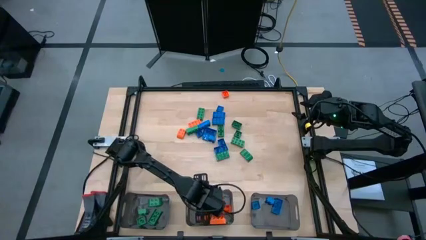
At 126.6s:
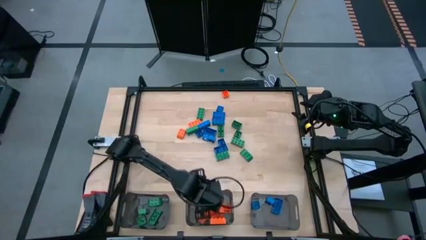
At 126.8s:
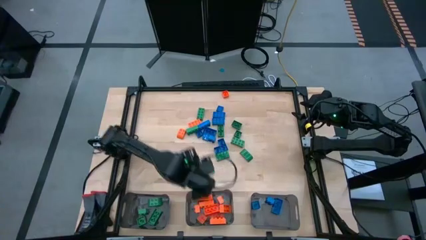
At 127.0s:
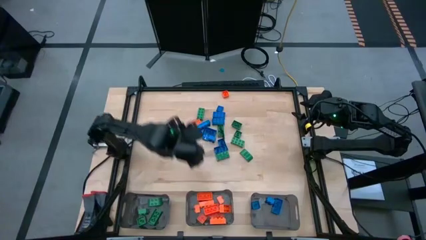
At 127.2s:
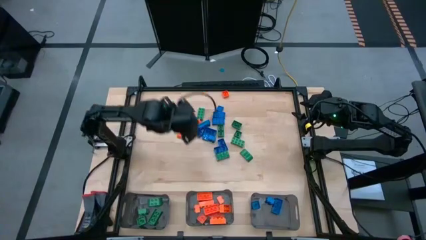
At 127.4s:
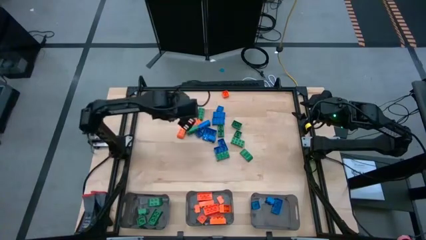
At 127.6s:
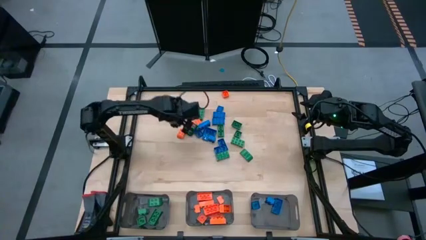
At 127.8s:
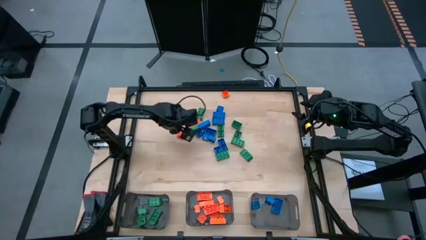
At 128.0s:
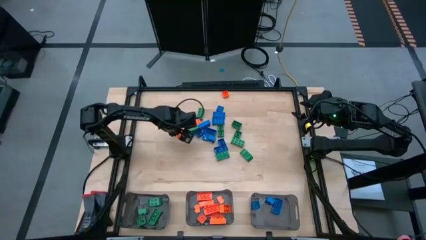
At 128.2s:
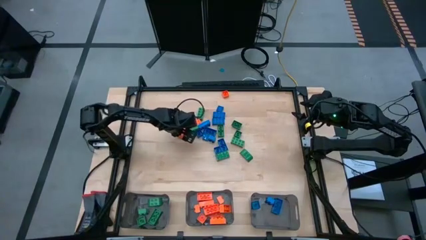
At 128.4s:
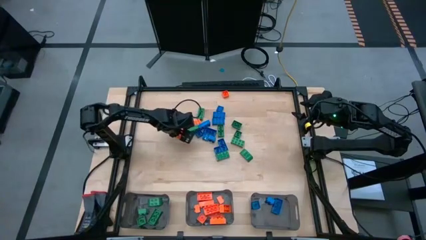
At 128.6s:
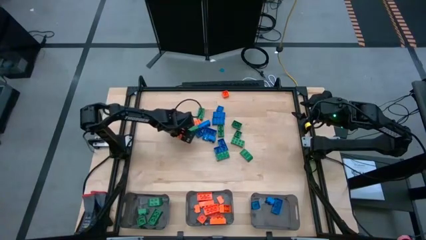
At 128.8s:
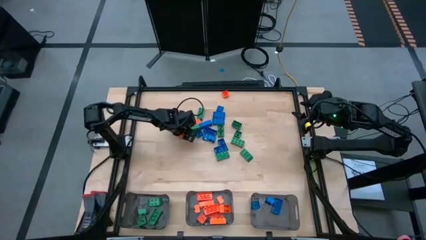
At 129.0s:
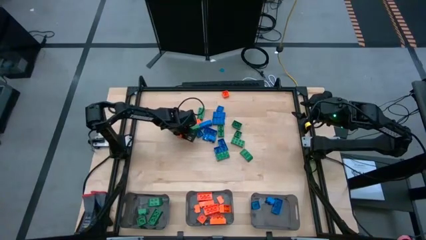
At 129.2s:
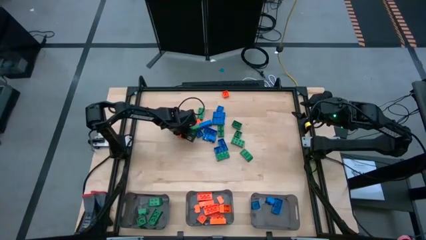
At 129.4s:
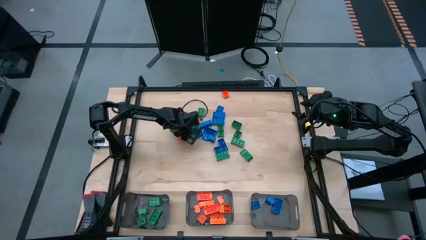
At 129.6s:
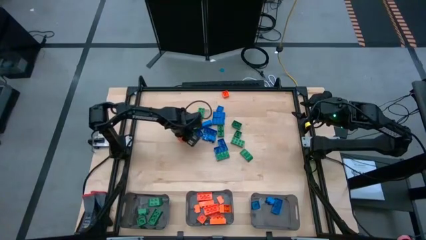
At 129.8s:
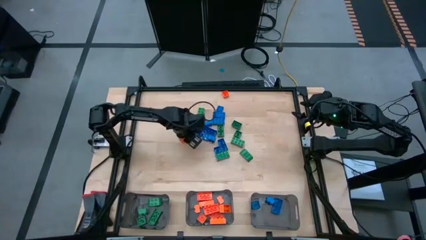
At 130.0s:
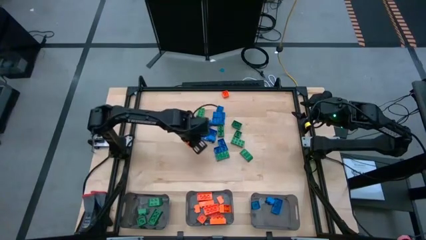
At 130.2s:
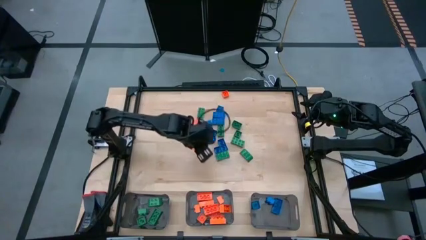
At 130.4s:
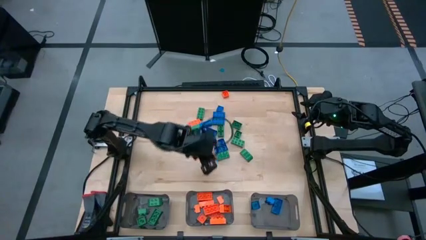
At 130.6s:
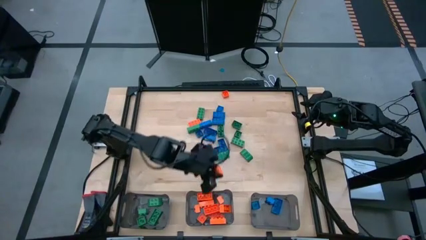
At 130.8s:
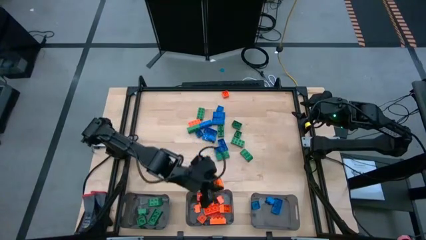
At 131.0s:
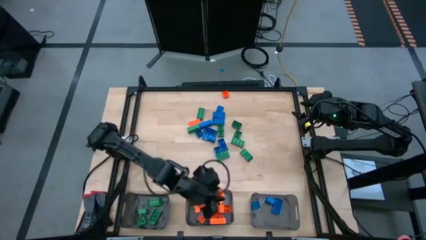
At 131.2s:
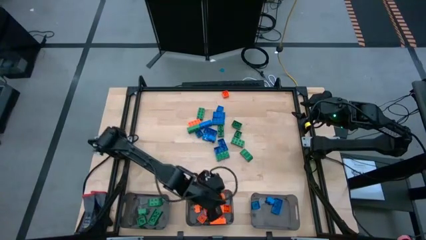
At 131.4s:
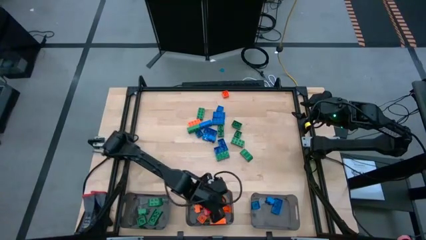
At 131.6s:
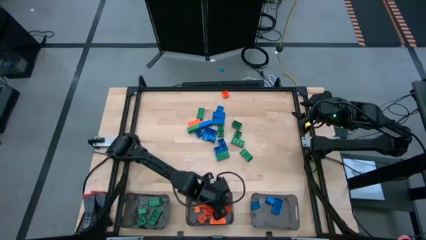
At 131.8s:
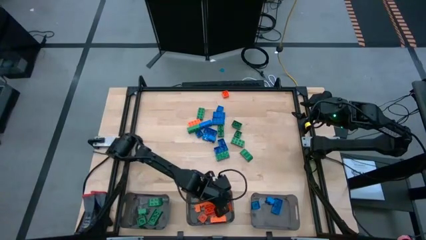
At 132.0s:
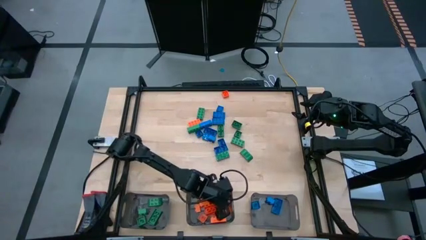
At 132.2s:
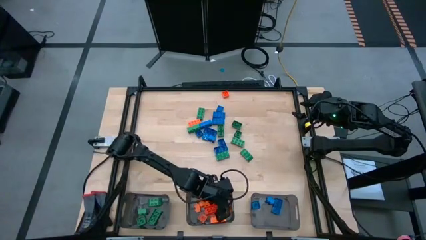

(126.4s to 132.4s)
Task: Sort blocks
Put the orange game piece into the middle black bin

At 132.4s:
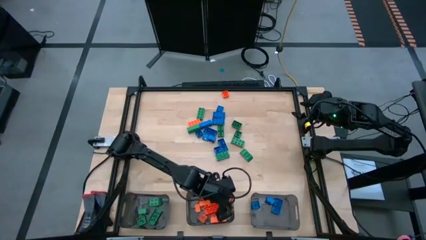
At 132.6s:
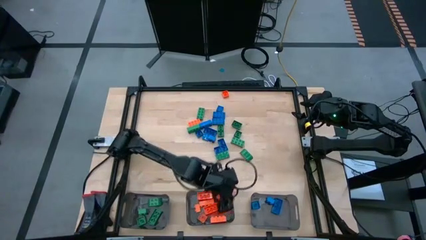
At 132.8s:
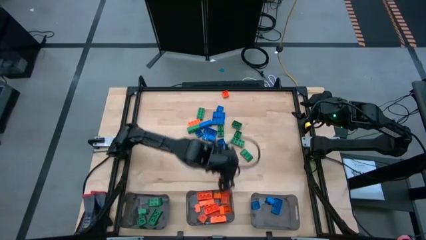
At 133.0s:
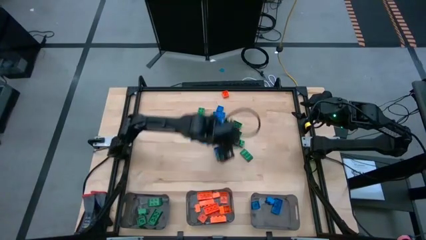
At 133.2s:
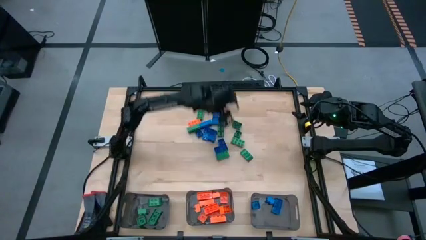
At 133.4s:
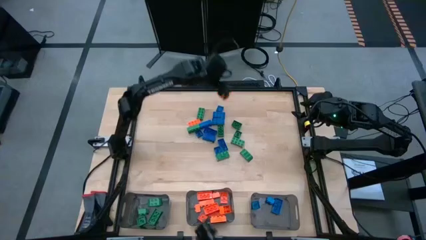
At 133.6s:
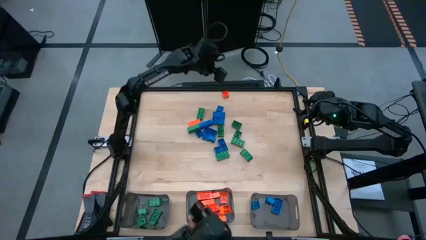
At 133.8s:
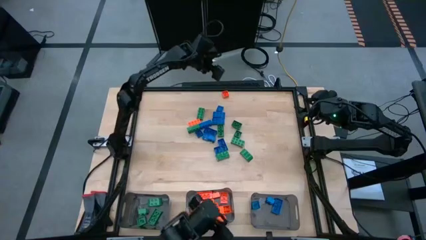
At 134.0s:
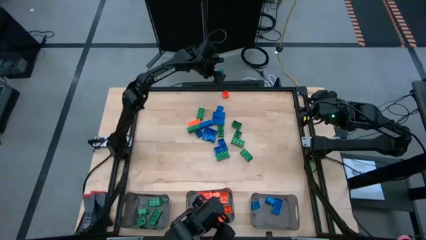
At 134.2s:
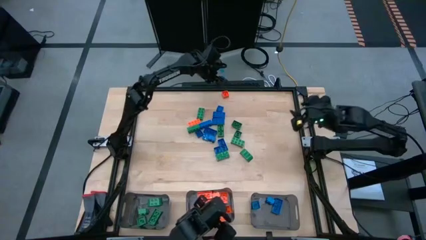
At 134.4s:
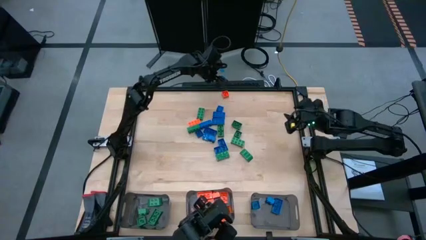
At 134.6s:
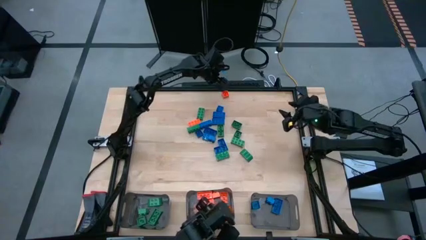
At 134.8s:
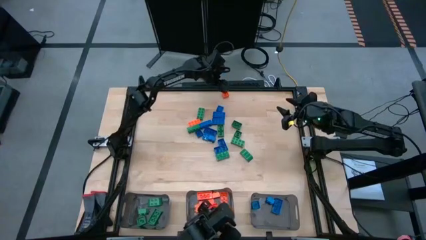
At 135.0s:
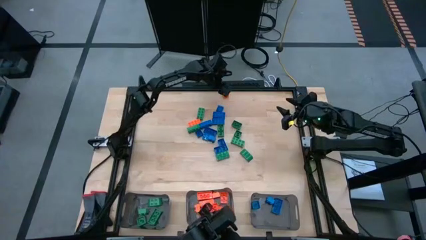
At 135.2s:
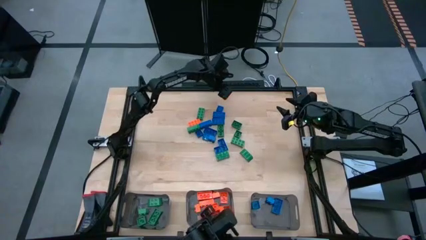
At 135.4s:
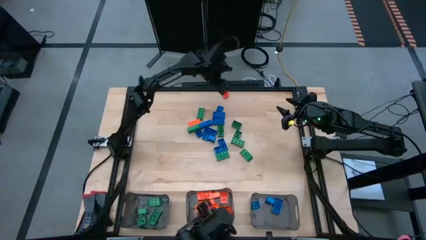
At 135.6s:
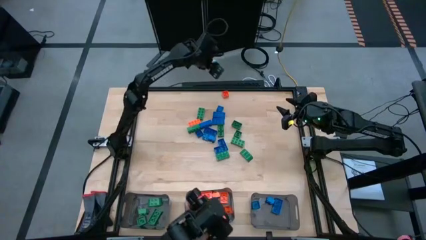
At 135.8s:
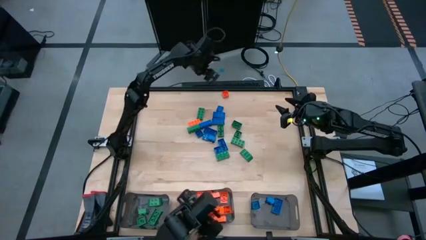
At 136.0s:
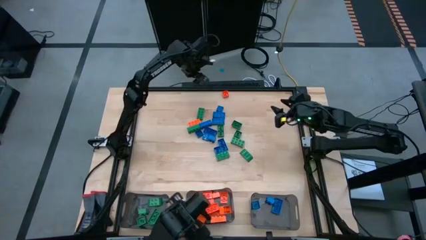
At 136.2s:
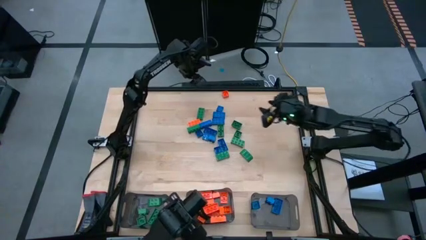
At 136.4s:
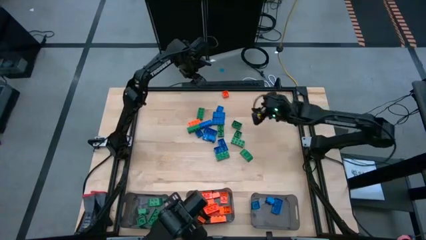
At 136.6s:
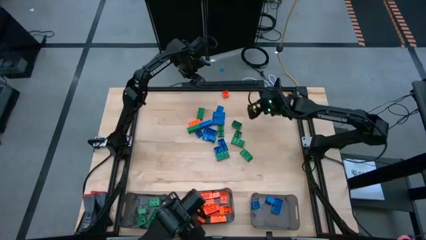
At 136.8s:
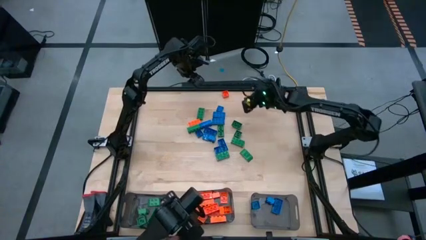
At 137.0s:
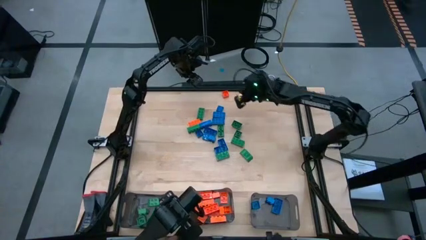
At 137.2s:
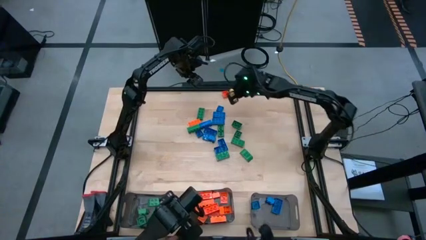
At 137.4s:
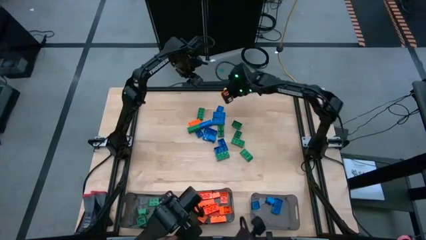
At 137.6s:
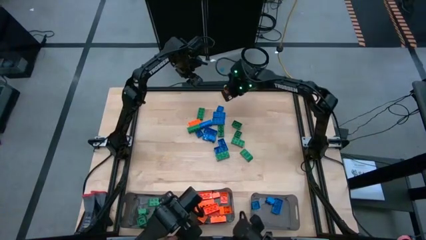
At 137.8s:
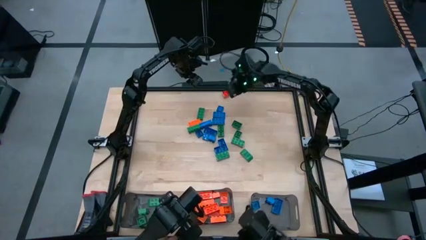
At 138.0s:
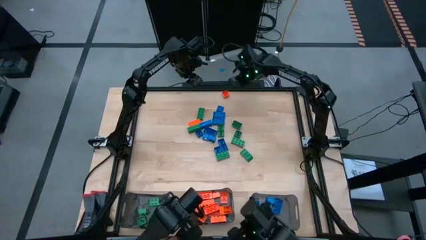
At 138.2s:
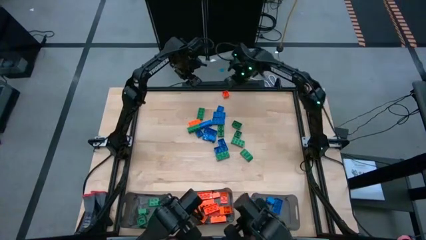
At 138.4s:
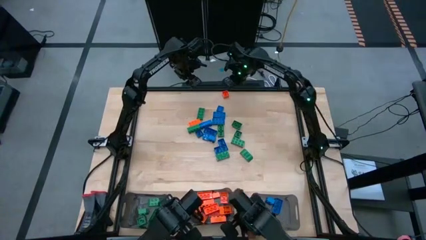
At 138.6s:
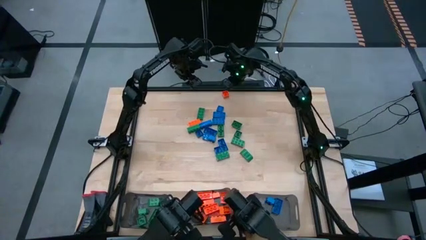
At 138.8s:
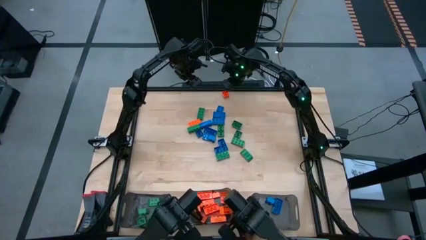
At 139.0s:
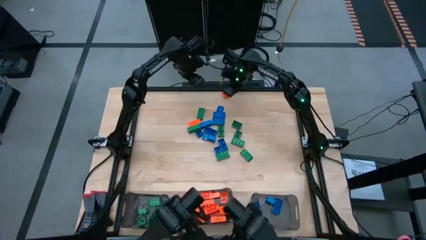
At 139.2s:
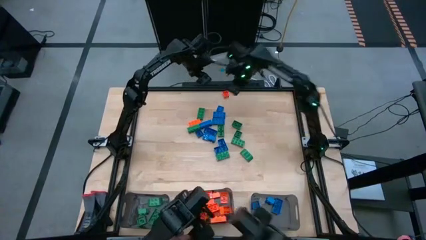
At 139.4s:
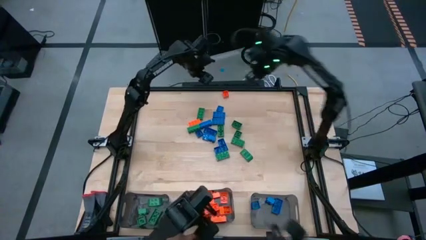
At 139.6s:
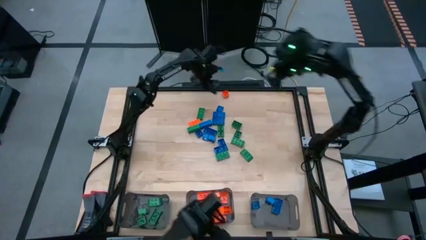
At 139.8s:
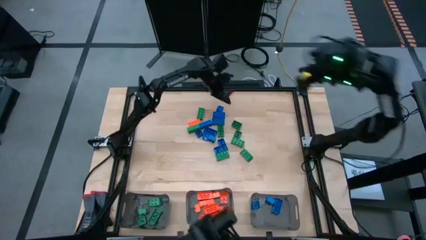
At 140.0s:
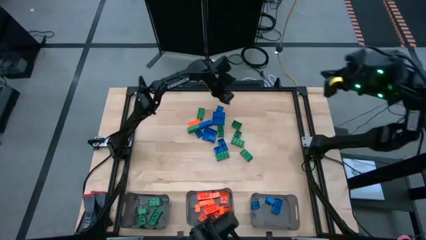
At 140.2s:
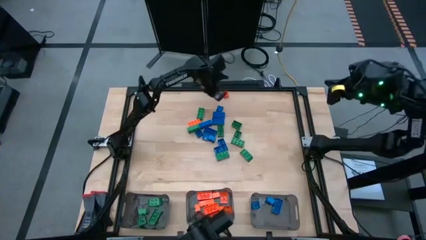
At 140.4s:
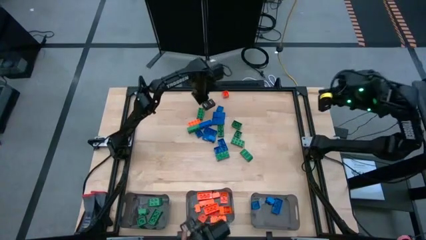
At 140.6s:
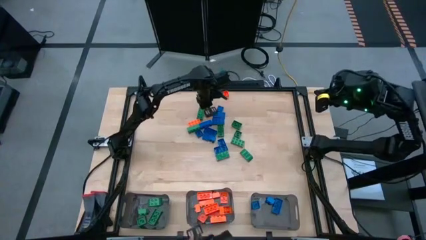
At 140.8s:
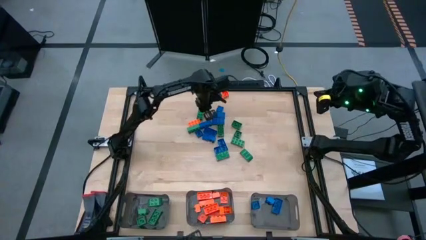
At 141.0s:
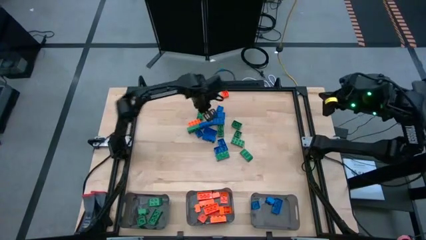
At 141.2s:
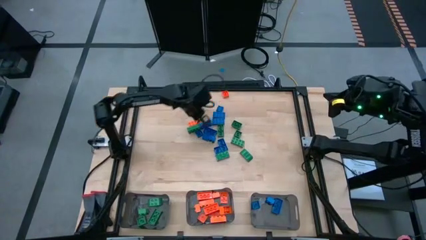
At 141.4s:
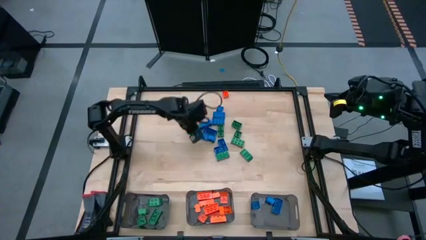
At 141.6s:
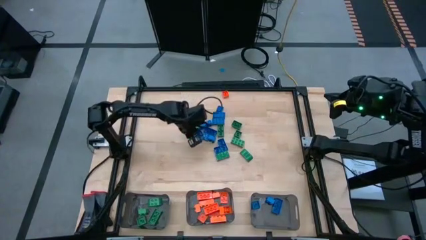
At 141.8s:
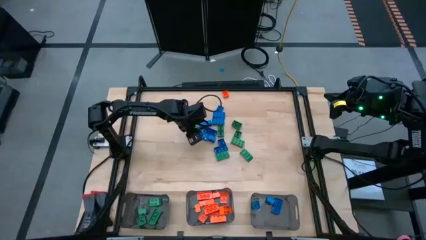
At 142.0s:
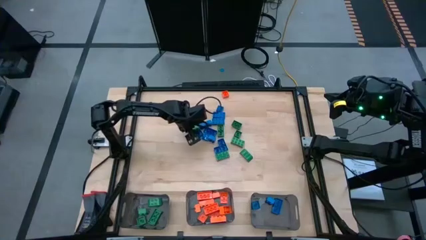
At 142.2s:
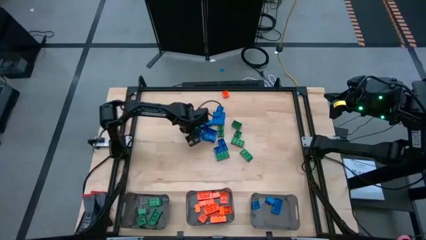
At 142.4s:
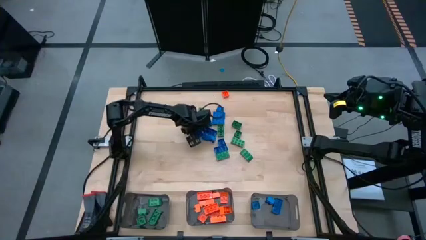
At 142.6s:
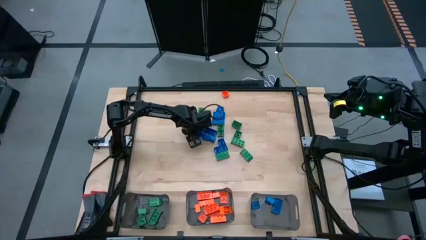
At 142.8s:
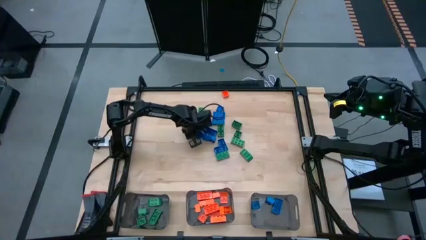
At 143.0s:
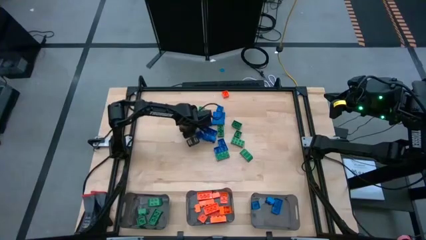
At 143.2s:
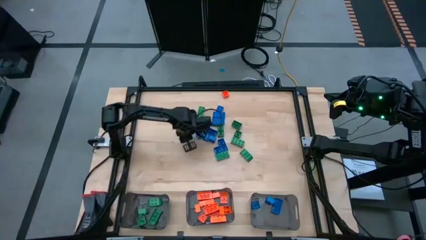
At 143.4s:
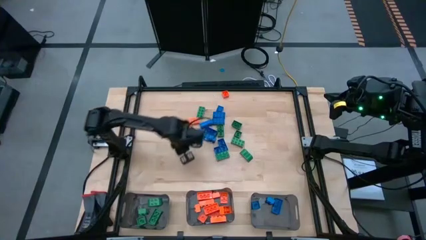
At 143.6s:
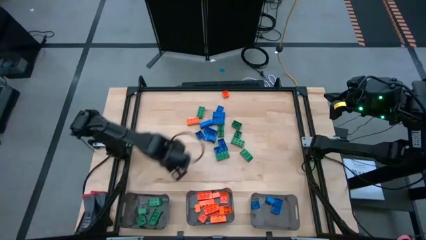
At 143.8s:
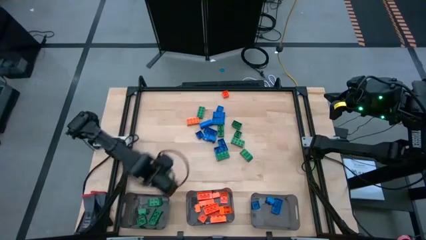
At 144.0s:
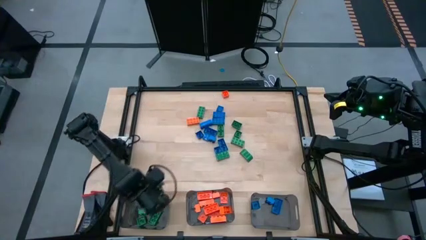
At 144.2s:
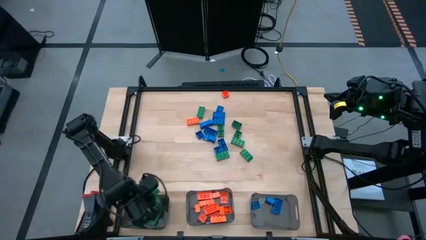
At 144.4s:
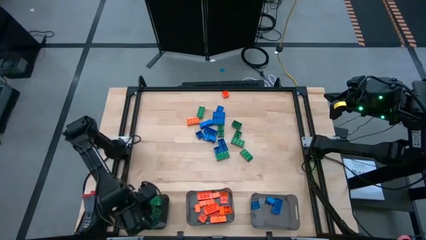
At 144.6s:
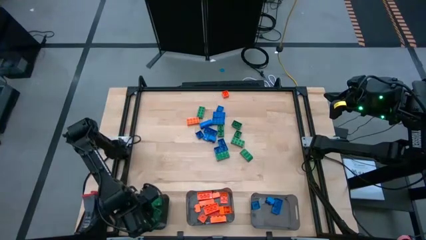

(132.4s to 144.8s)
Put the green game piece into the left black bin
